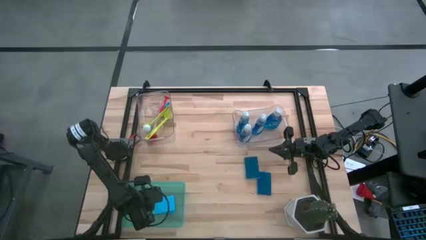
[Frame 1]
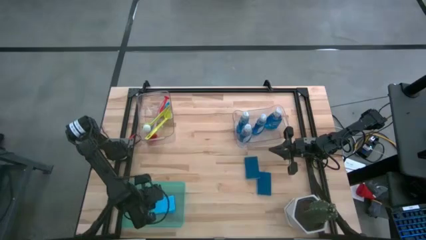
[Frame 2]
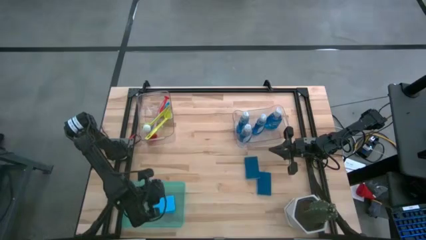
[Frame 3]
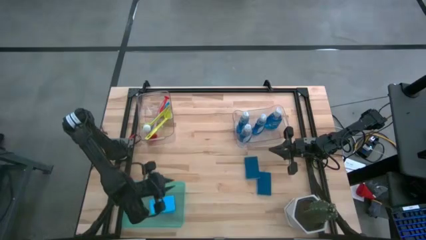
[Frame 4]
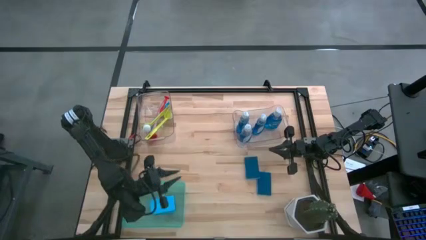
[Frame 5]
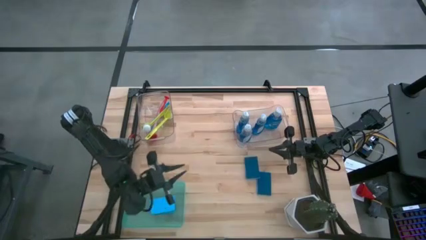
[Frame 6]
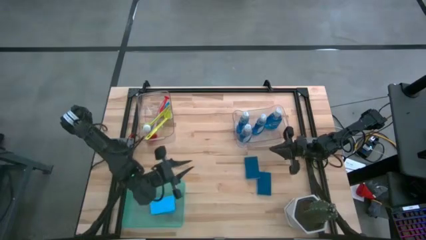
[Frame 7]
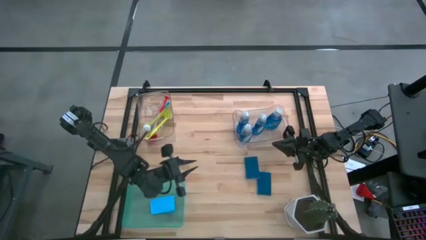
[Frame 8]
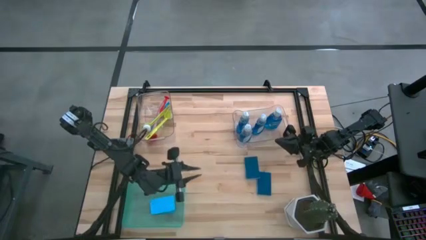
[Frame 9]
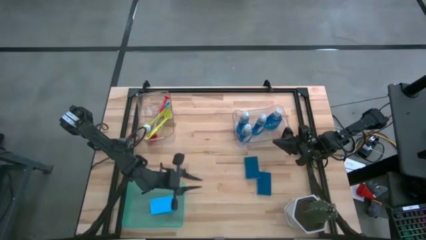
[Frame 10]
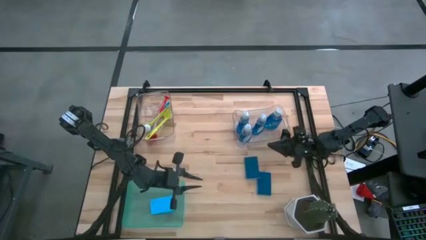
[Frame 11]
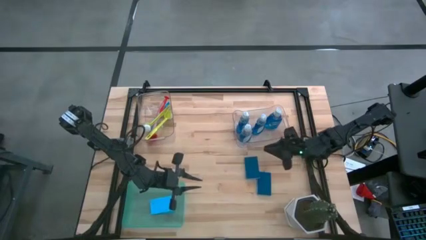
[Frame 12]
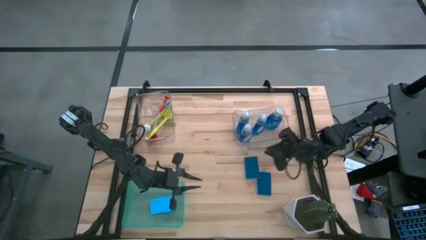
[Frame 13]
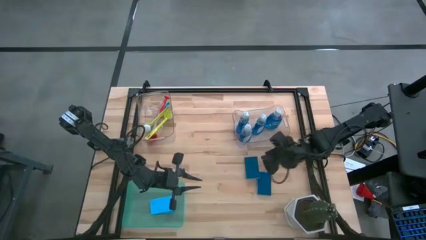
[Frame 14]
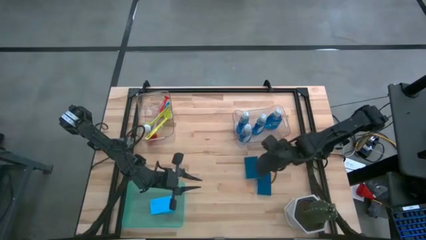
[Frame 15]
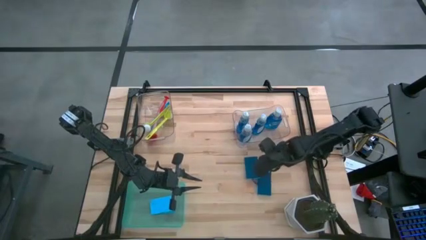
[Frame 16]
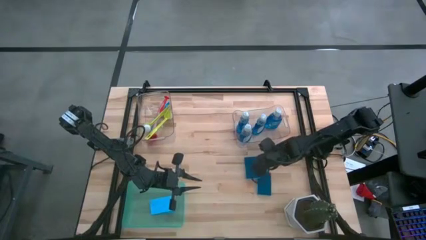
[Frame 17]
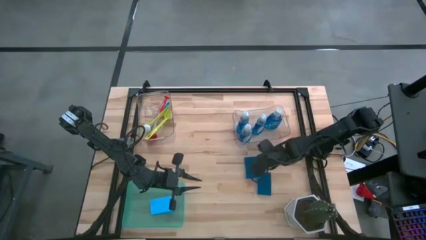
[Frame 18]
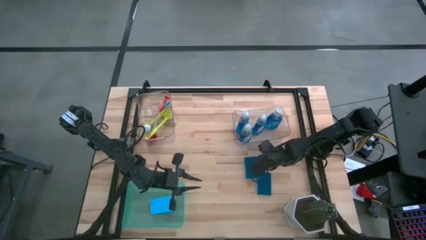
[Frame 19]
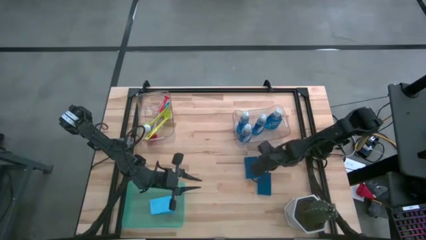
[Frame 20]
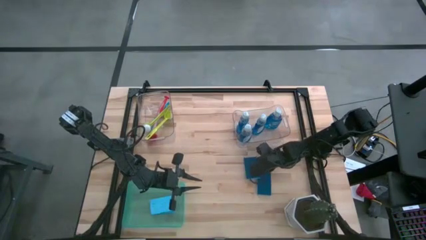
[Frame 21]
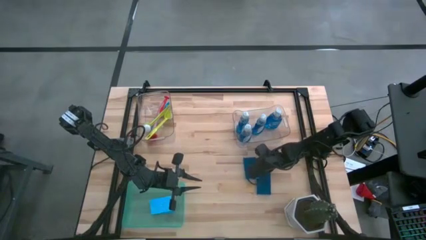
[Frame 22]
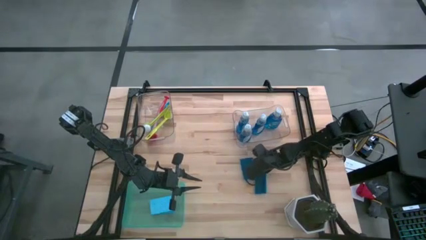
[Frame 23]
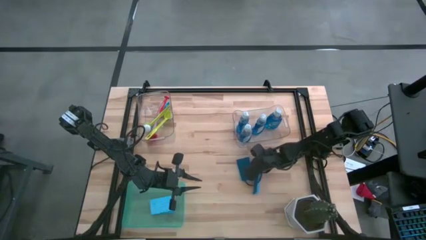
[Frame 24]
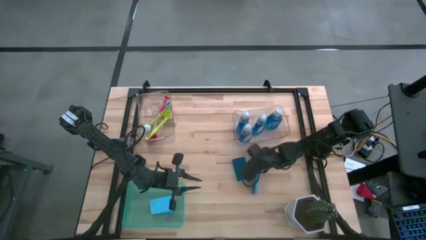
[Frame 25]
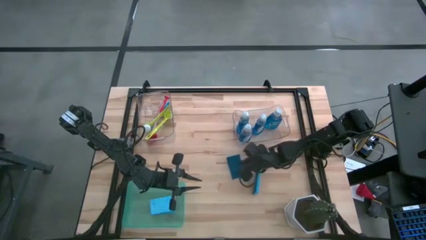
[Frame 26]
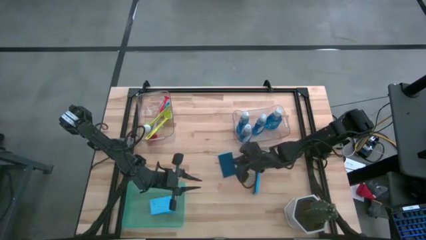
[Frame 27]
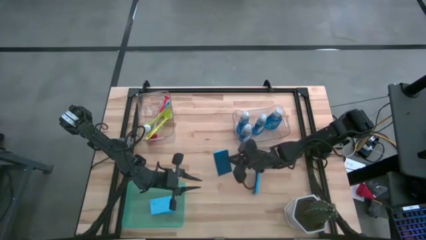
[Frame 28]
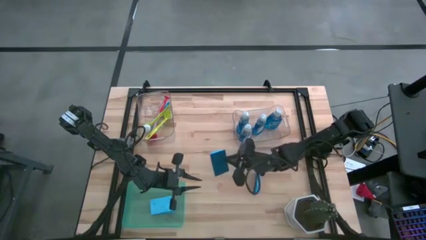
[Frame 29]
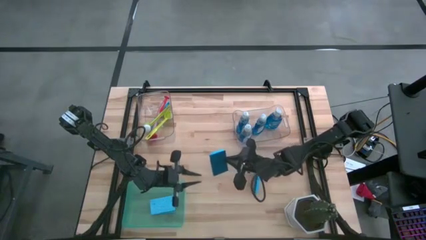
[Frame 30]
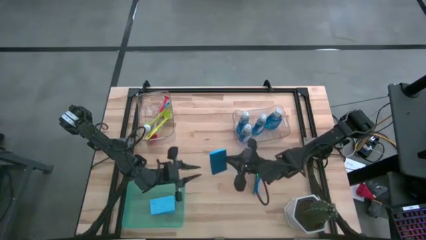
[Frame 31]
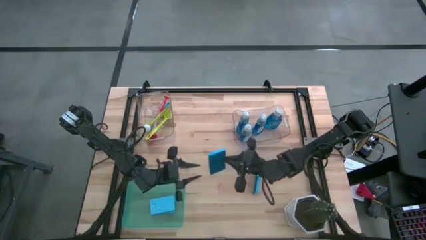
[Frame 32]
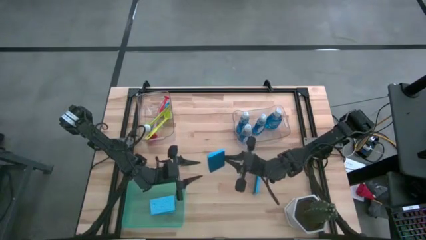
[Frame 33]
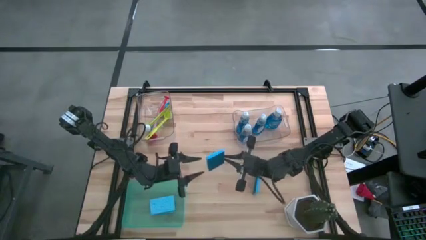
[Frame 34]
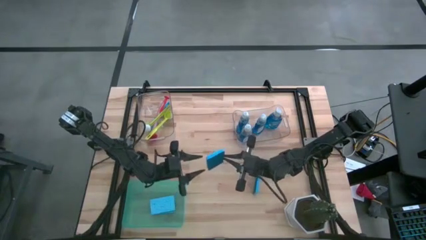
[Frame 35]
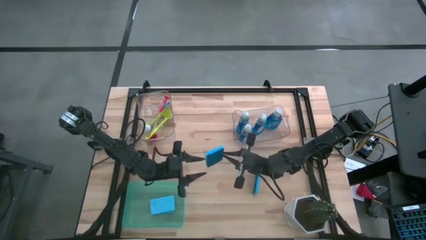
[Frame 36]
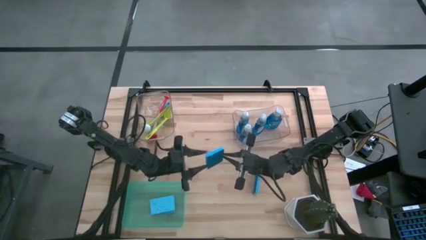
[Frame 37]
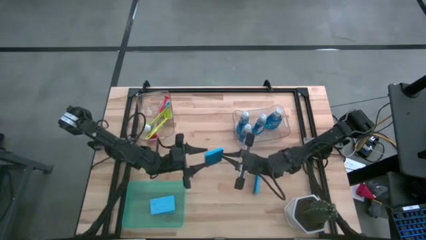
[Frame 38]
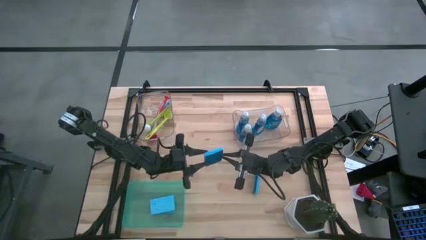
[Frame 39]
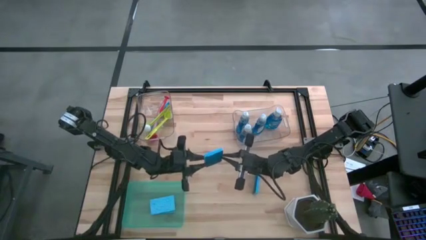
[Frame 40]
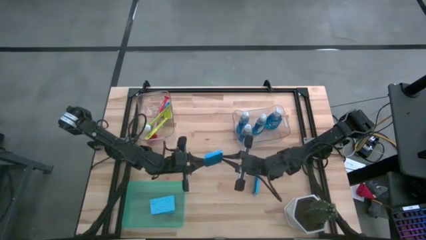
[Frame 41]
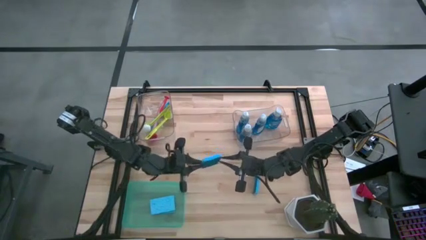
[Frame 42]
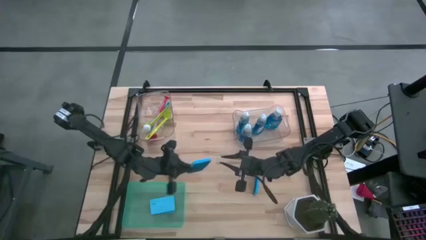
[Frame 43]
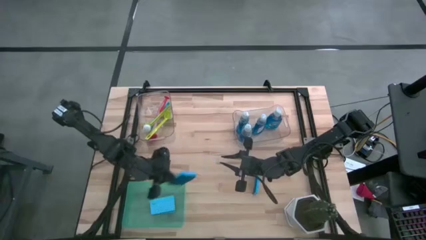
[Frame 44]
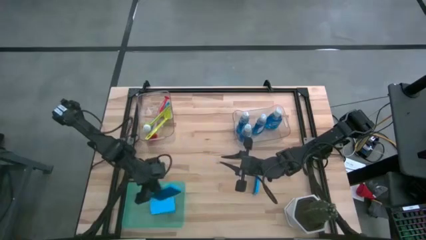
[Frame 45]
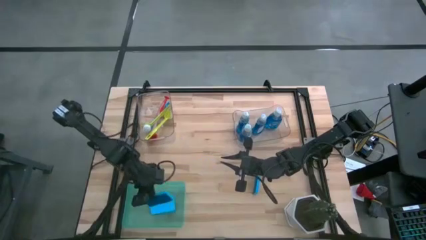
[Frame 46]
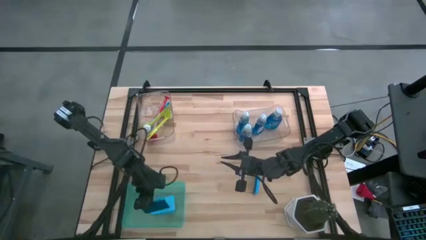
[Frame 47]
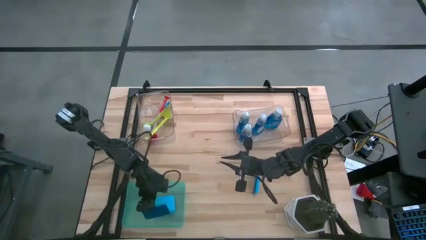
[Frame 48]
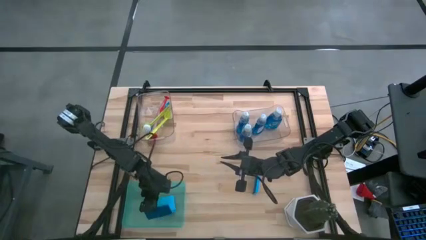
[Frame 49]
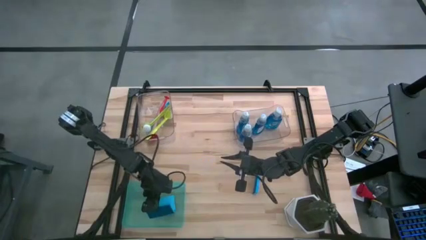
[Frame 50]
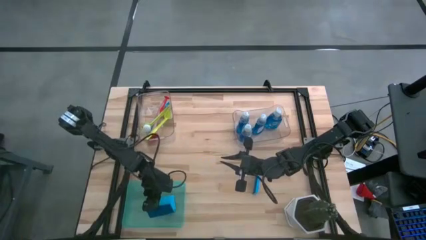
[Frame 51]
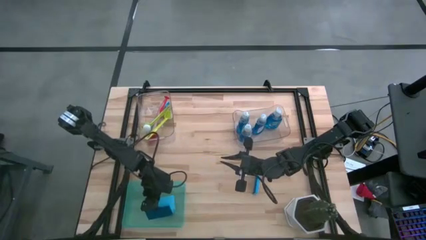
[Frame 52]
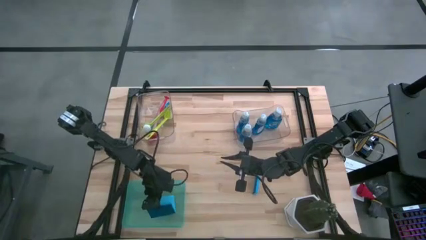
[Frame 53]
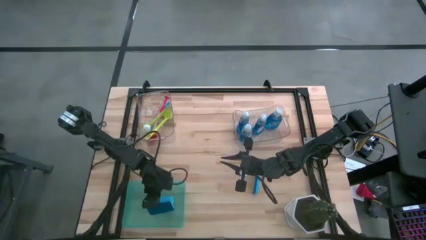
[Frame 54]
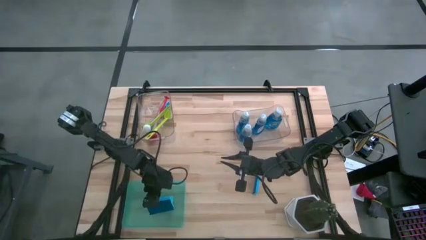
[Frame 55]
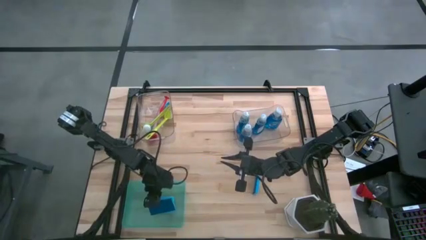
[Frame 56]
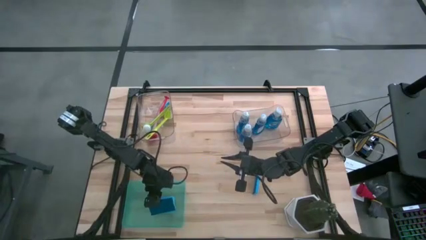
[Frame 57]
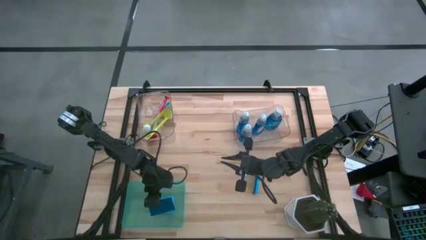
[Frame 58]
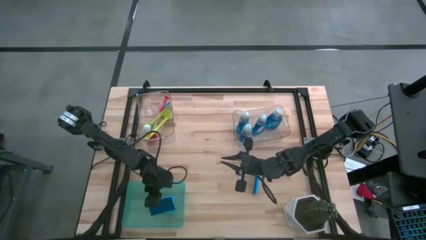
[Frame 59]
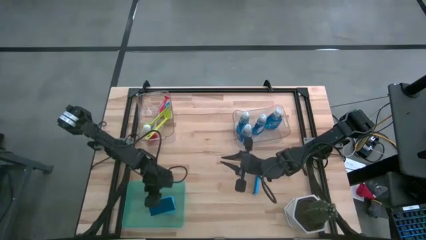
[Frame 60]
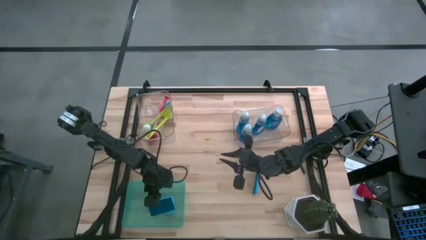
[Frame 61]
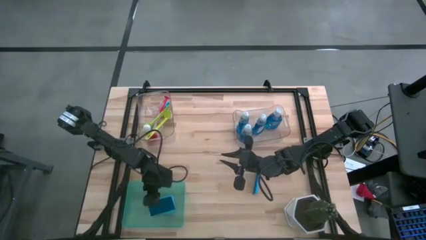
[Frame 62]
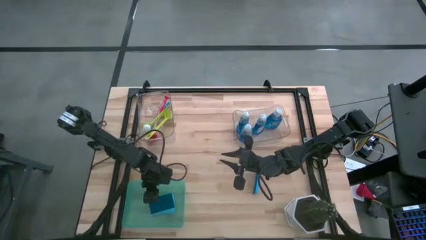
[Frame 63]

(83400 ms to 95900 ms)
Task: Pick & Place Kitchen Sink Supplies
Stack the blue sponge on top of the blue sponge in the green bin

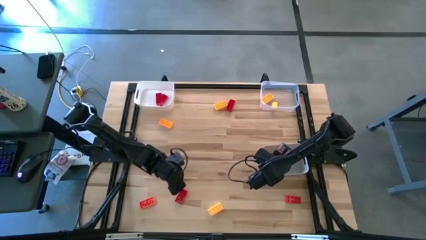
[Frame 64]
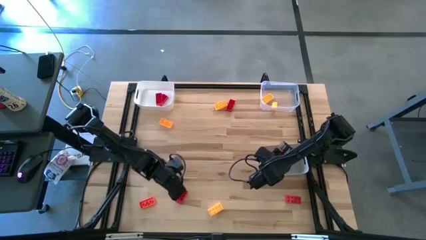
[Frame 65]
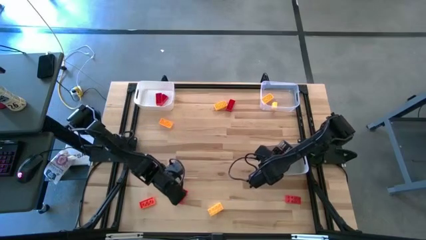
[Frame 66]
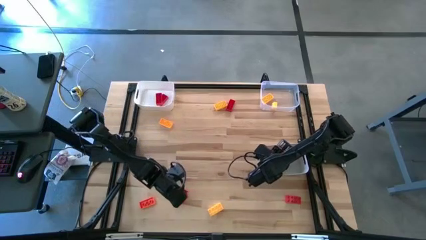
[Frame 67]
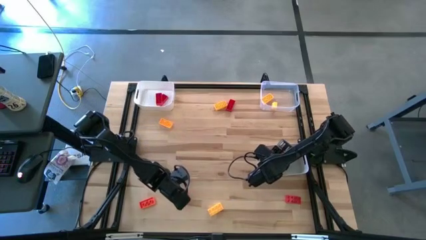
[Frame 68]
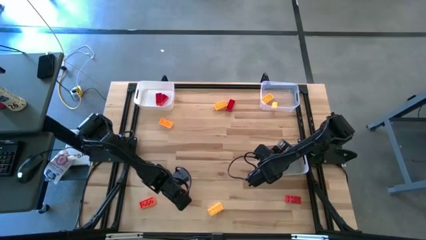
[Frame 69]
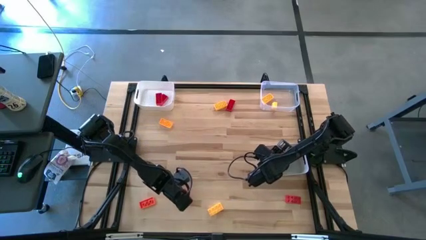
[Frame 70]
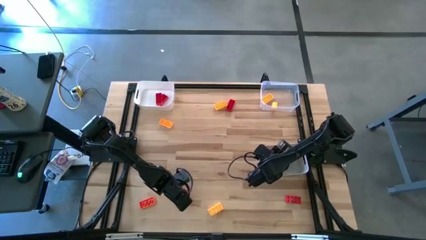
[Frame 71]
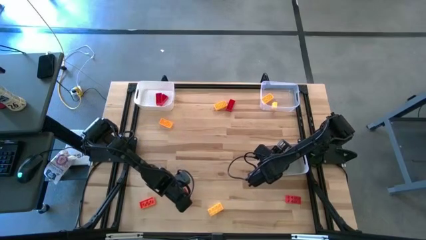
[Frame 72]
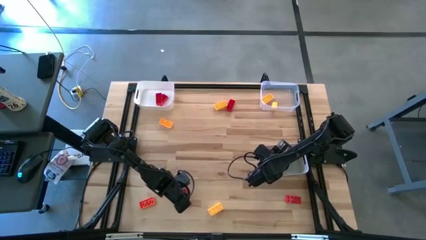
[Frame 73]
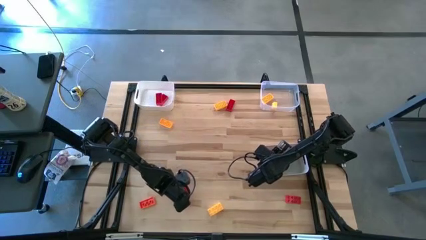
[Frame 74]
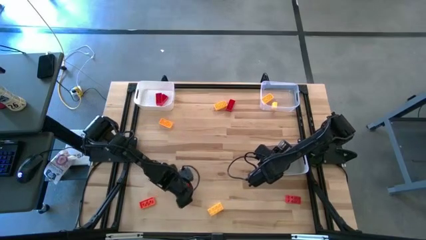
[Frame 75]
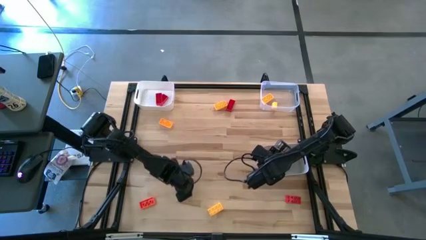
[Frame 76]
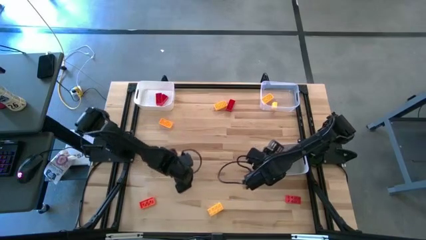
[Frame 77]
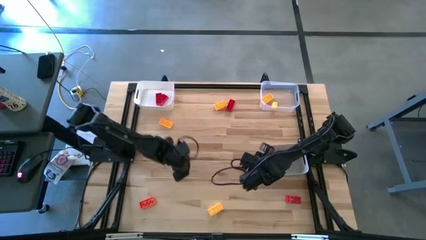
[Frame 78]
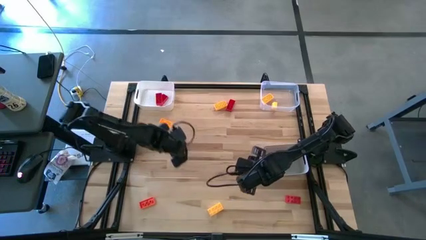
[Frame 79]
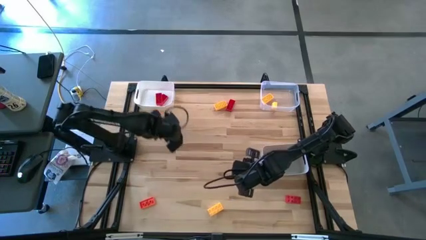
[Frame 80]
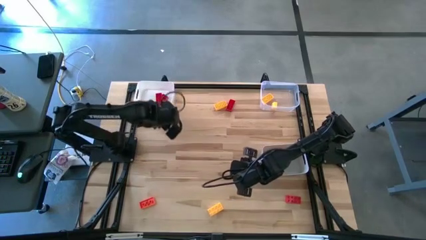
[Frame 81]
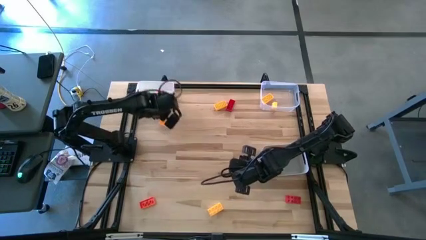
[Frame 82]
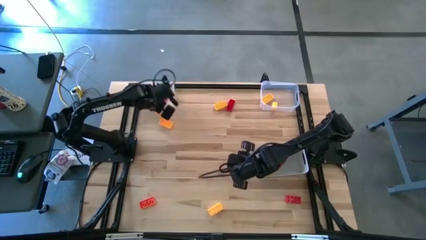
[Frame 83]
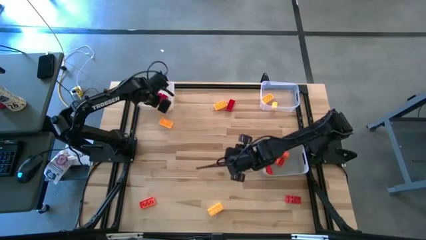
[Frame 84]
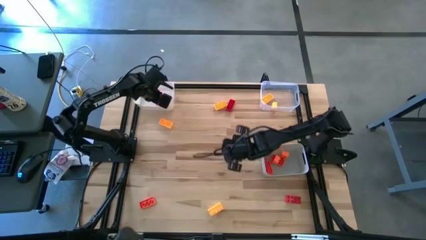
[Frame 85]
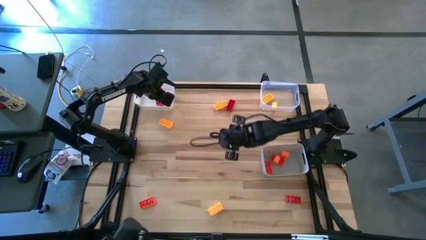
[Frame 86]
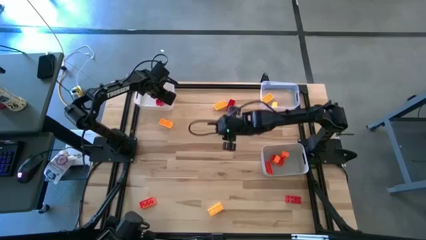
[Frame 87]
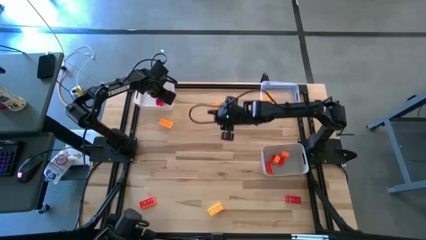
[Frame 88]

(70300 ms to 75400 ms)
Task: Sort & place blocks by color
Put the red game piece into the white bin
